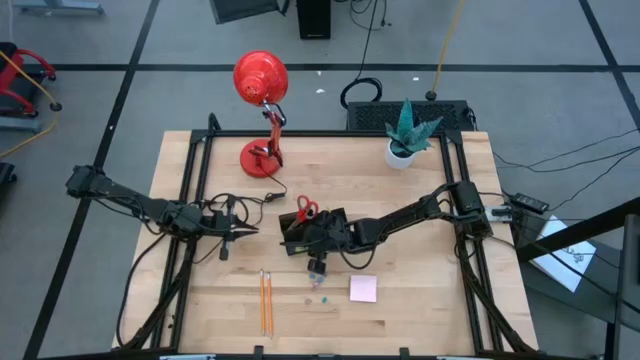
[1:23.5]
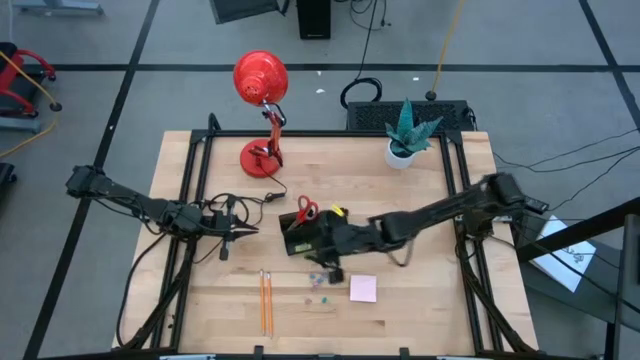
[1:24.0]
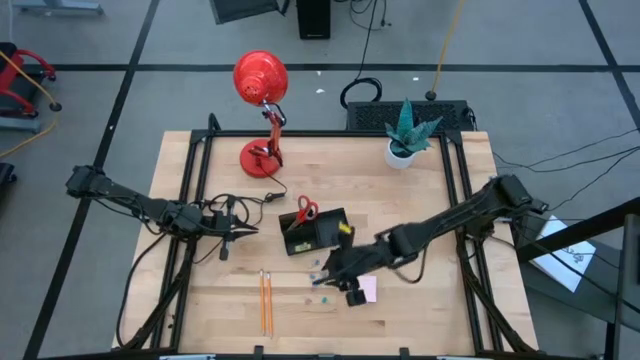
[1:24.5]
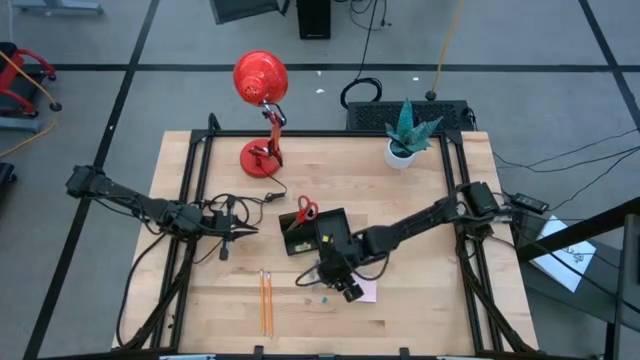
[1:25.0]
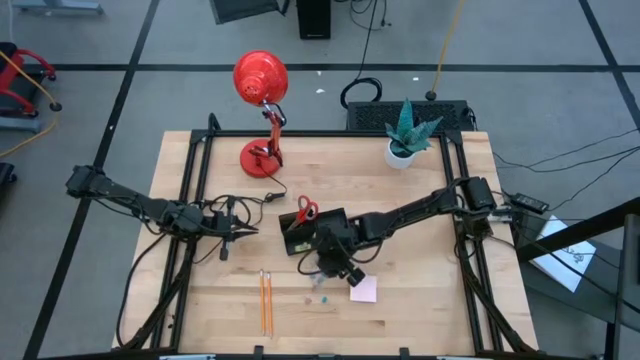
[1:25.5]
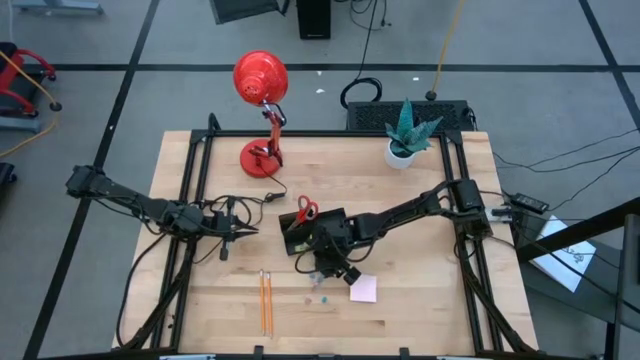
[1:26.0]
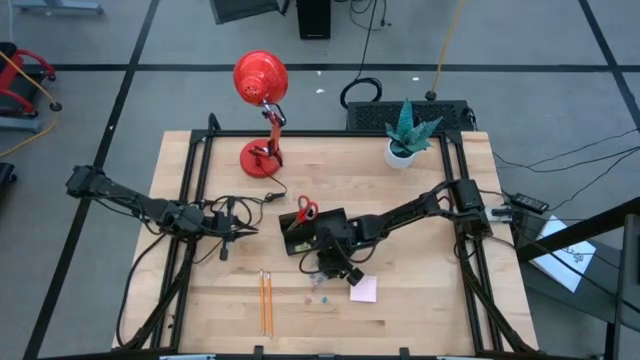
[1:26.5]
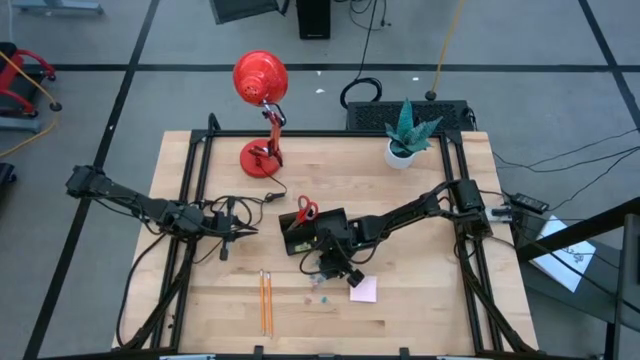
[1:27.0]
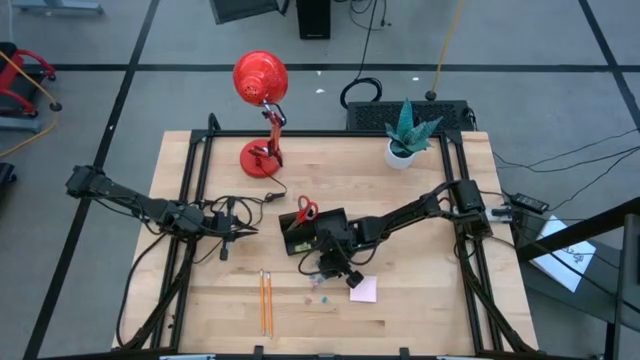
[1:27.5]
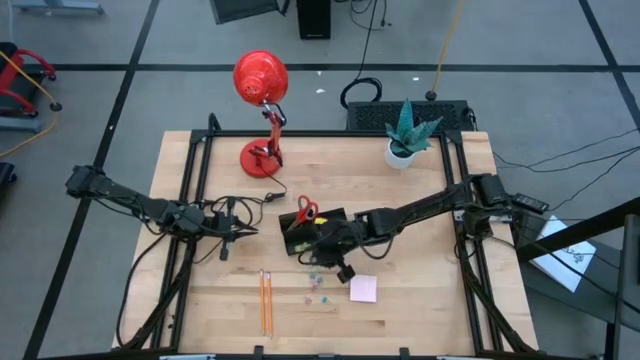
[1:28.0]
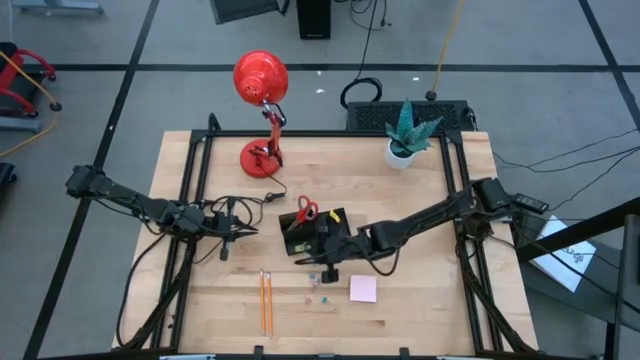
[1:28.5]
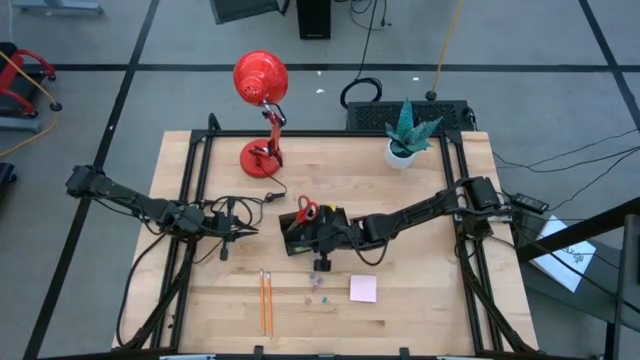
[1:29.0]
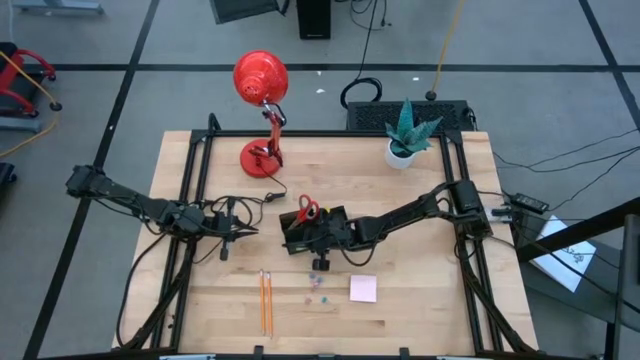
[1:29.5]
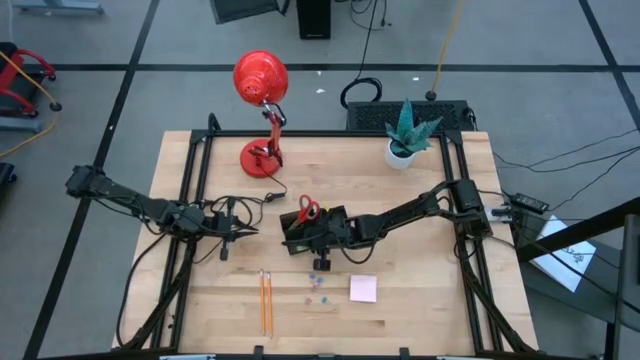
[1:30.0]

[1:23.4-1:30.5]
Task: Pick and place office supplies into organizer
Put the blue binder clip into the desk organizer

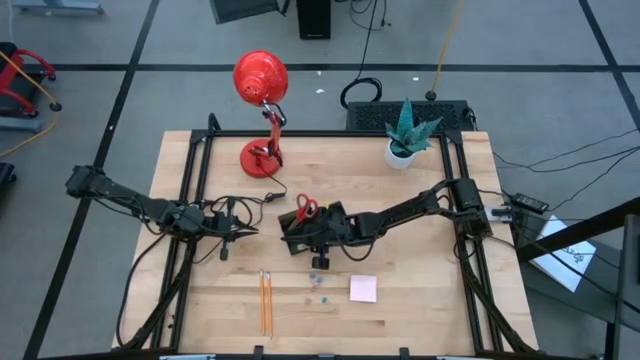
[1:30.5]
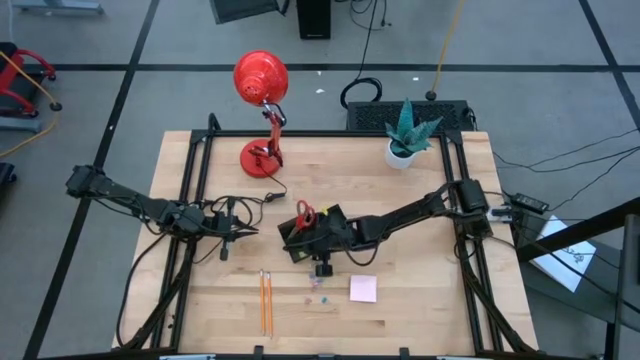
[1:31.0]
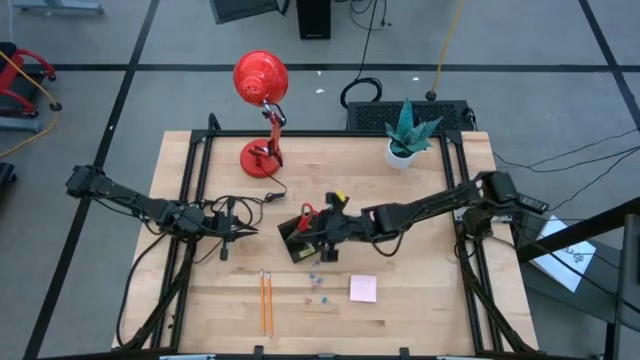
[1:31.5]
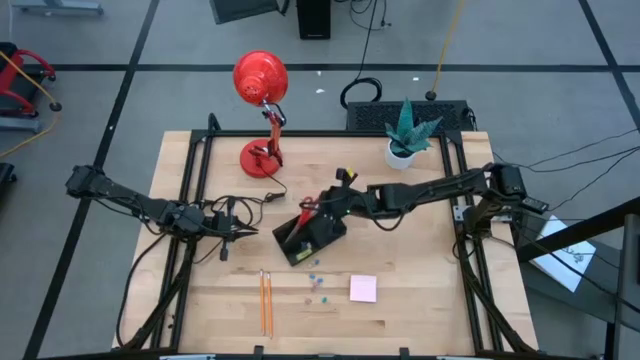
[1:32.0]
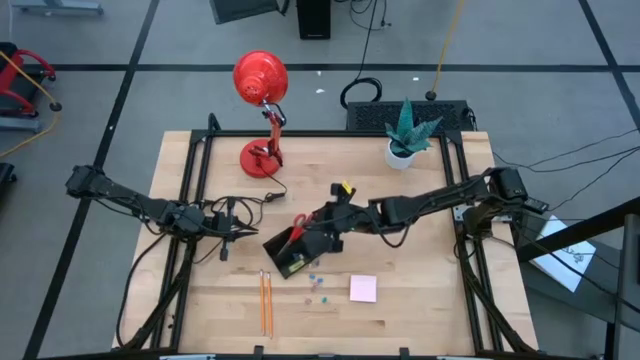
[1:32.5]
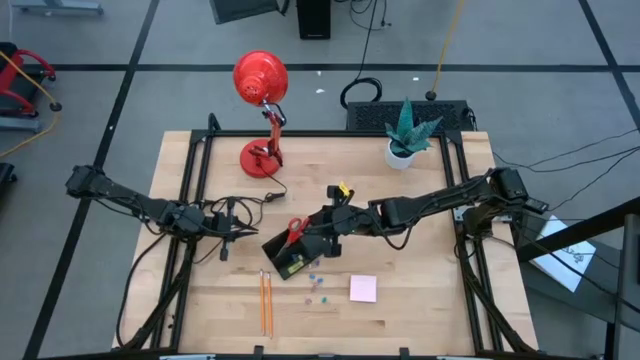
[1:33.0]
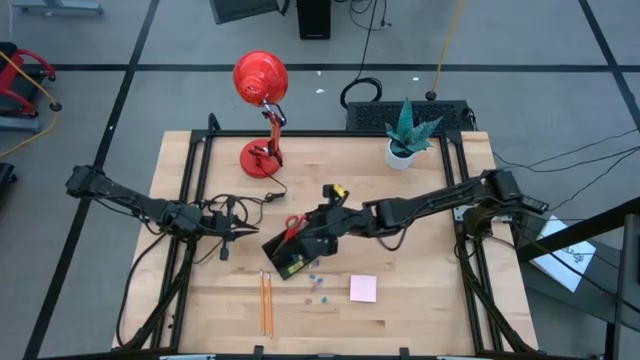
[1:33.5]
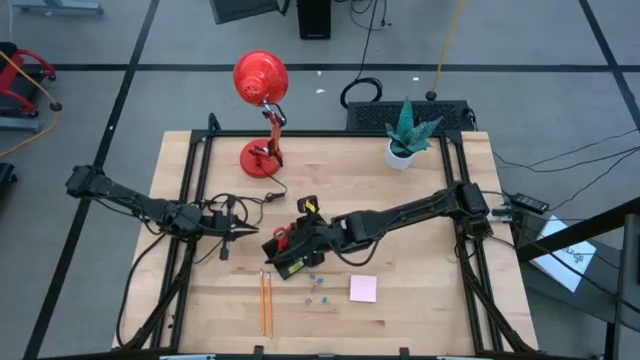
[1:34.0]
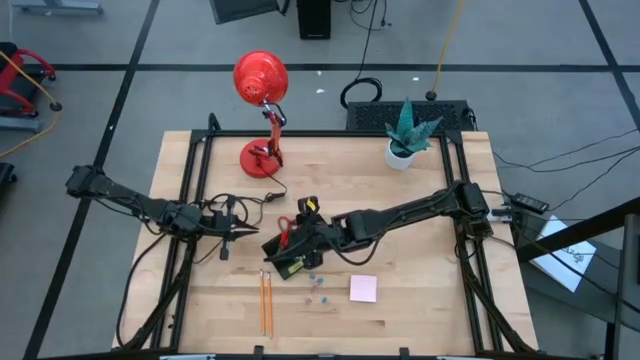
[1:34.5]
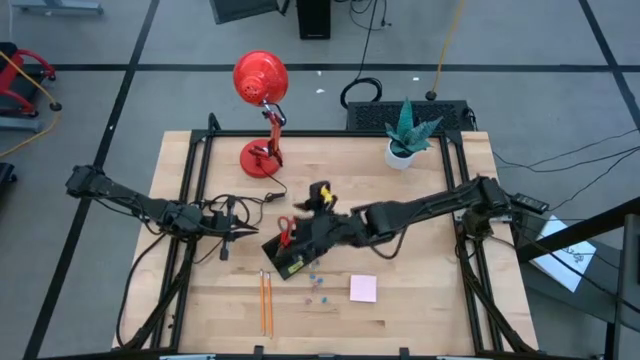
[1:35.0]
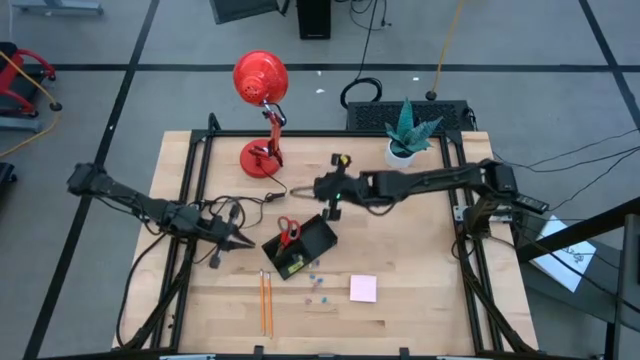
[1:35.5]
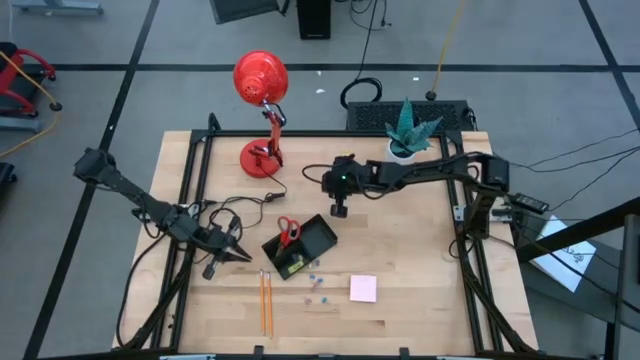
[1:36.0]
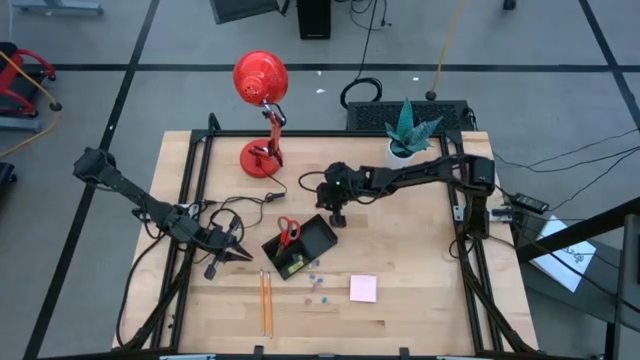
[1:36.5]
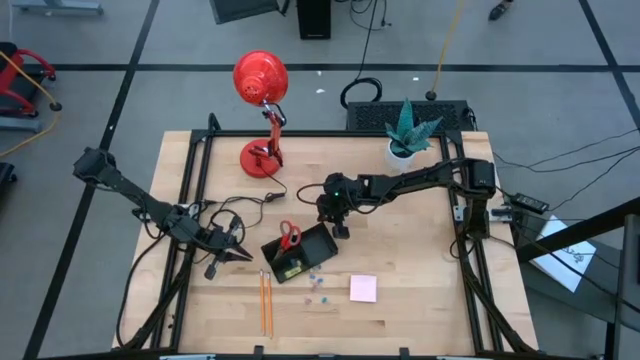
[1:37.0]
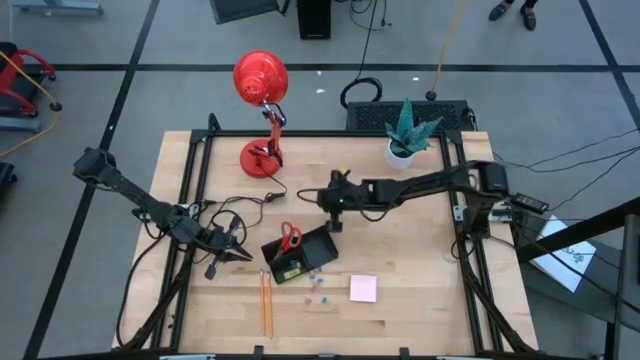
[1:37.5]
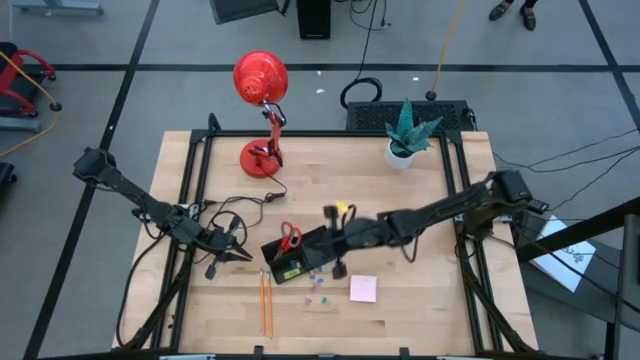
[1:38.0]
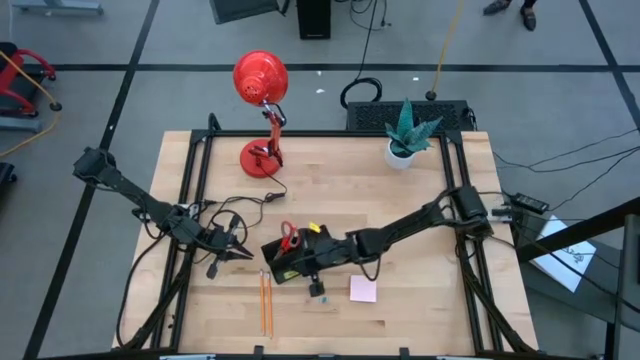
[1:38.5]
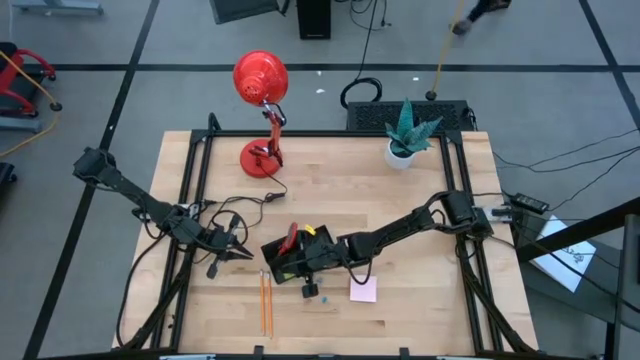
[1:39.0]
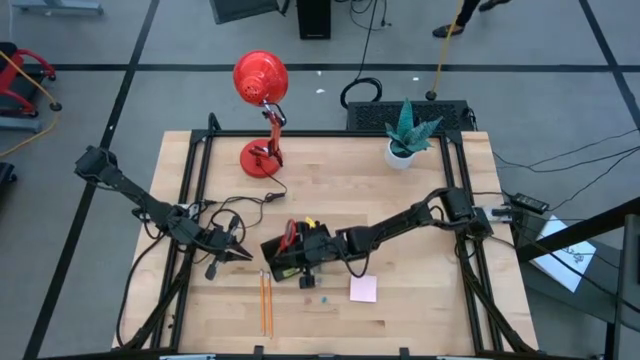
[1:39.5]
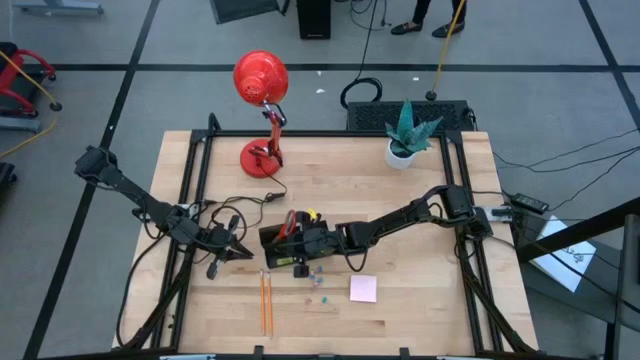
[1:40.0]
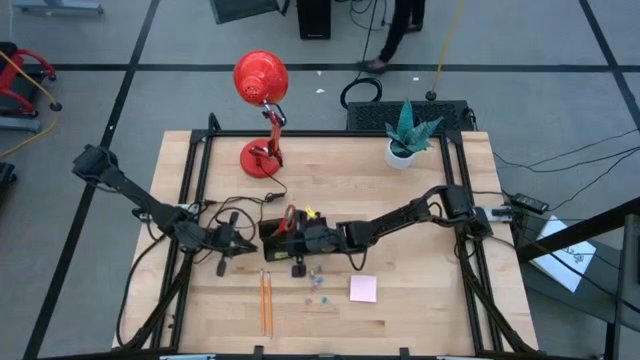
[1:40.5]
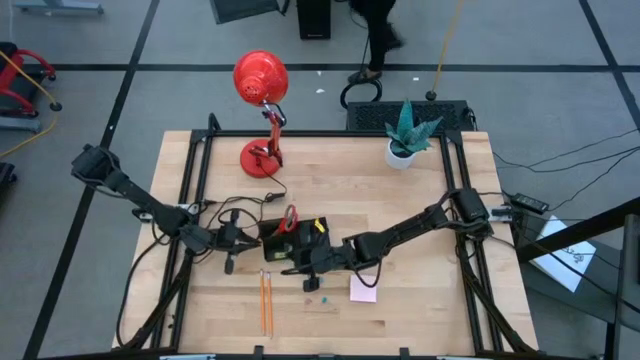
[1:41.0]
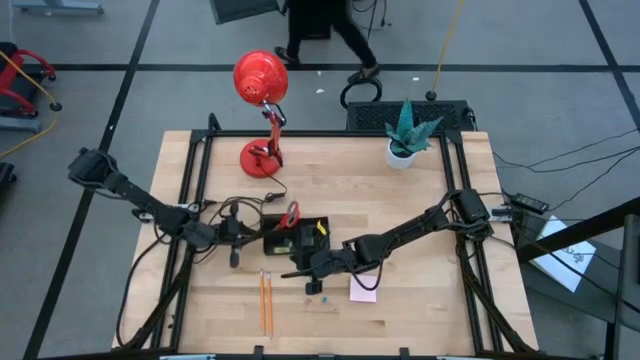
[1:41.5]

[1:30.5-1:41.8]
Adjust the desk organizer

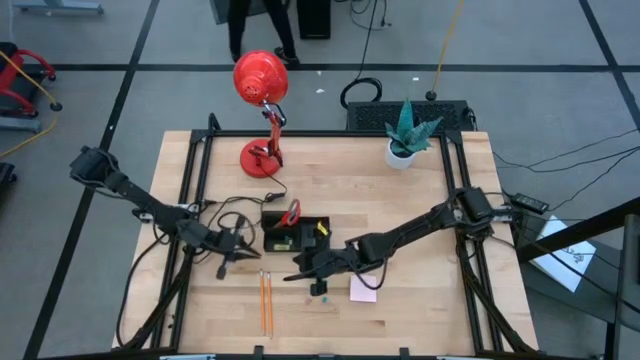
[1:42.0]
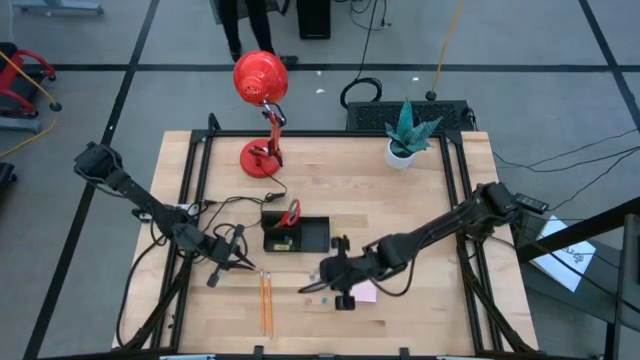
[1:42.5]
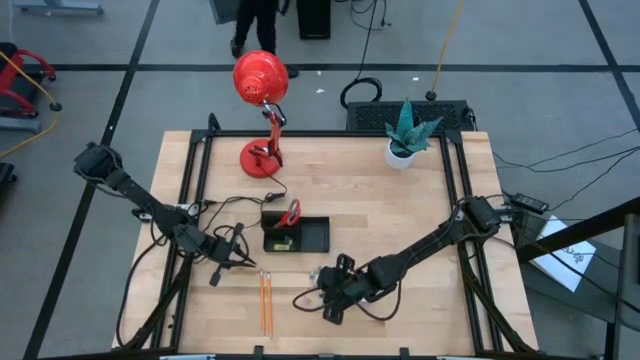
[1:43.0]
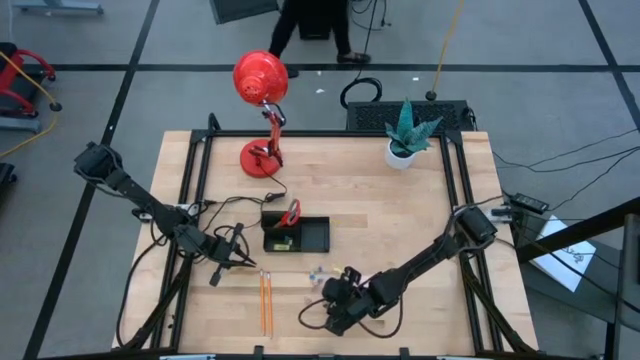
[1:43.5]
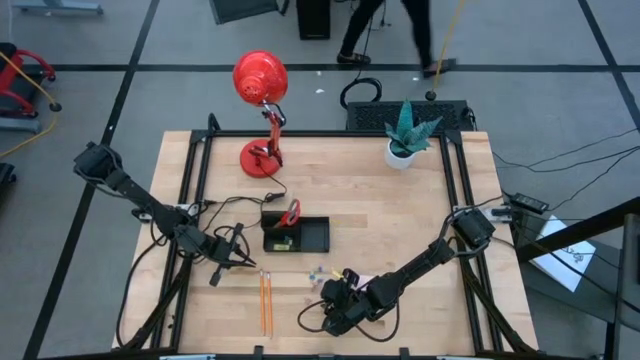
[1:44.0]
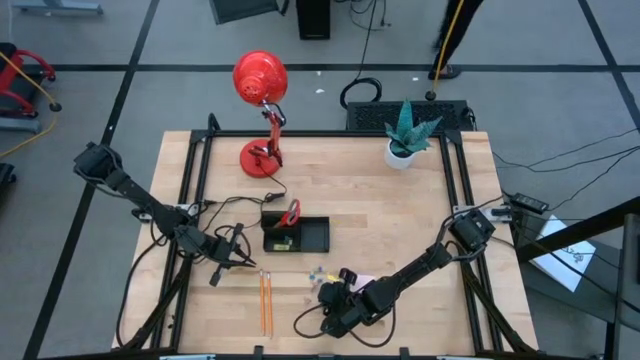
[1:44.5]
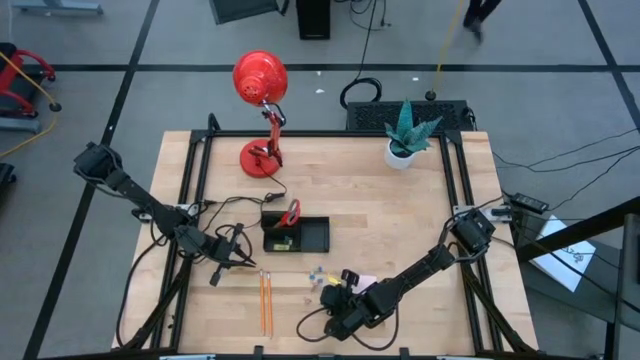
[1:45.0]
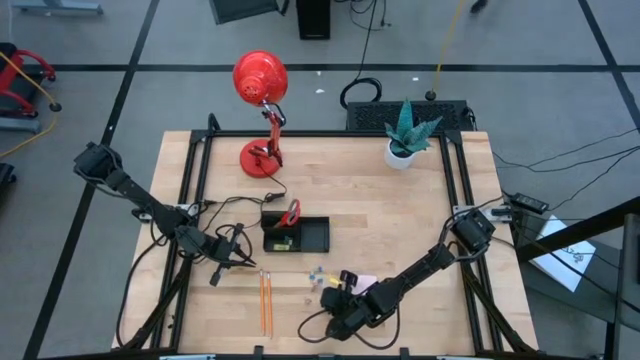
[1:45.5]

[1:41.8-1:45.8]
Put the blue binder clip into the desk organizer
